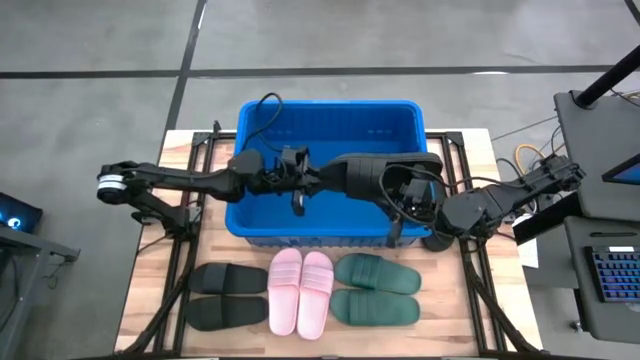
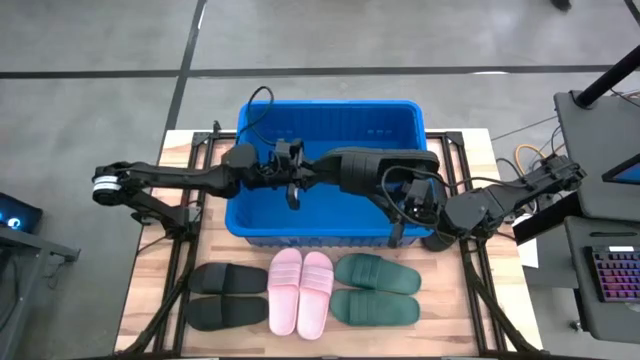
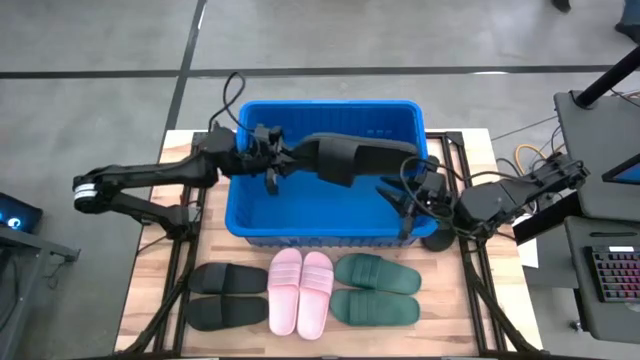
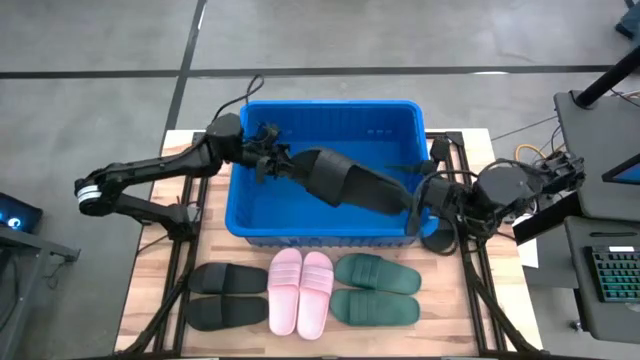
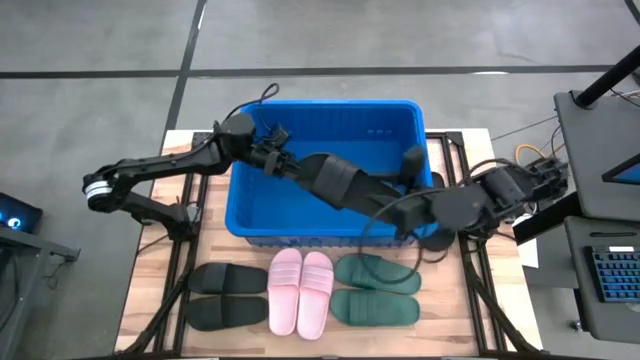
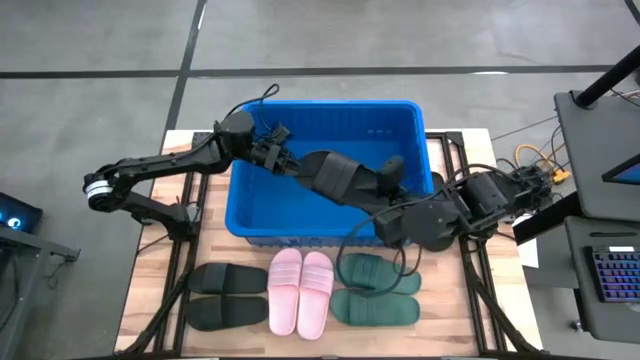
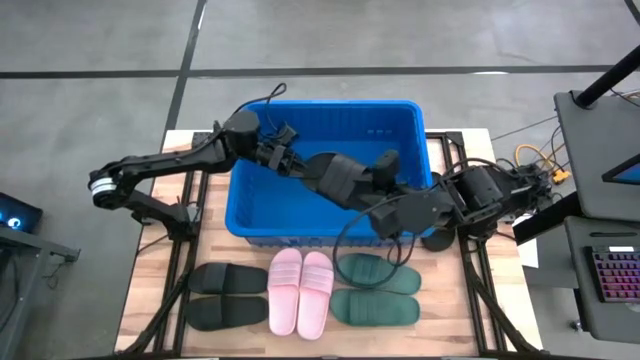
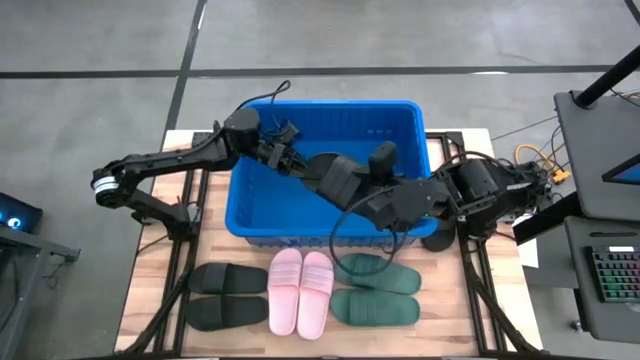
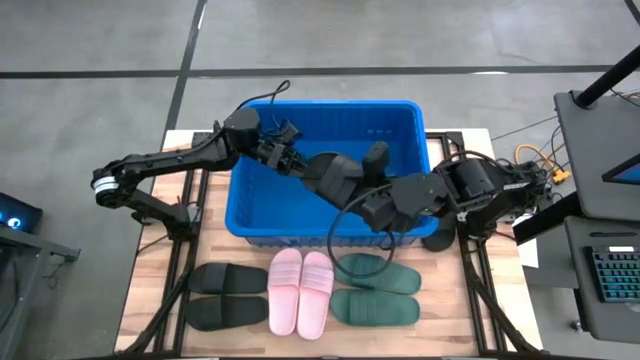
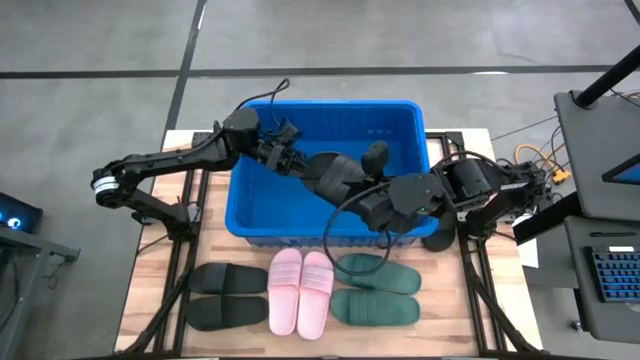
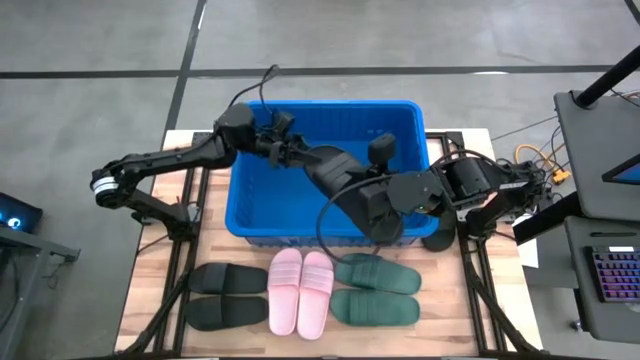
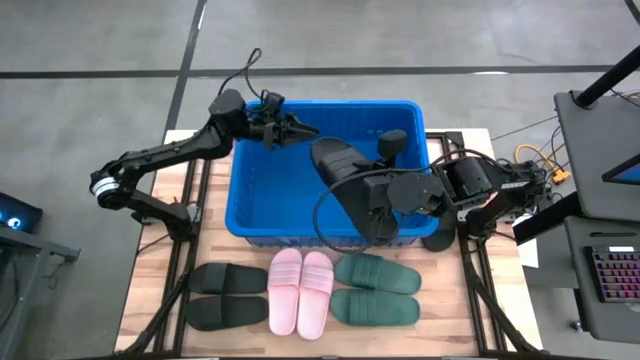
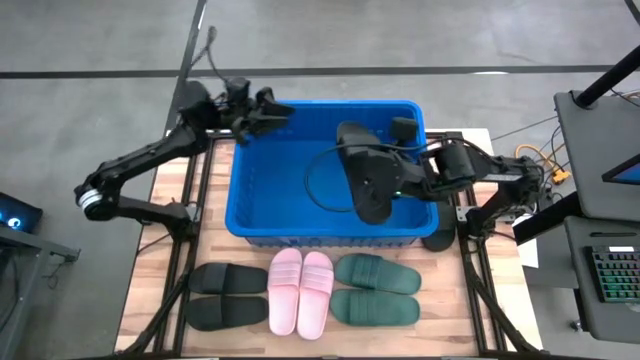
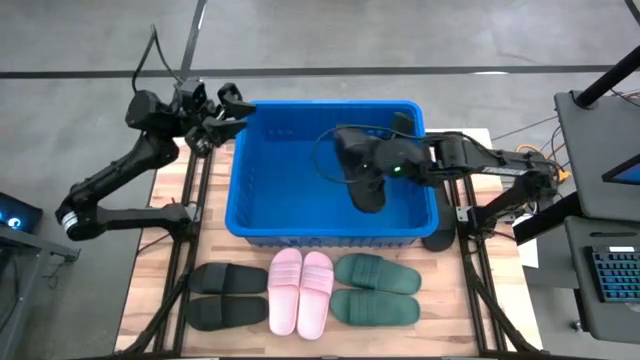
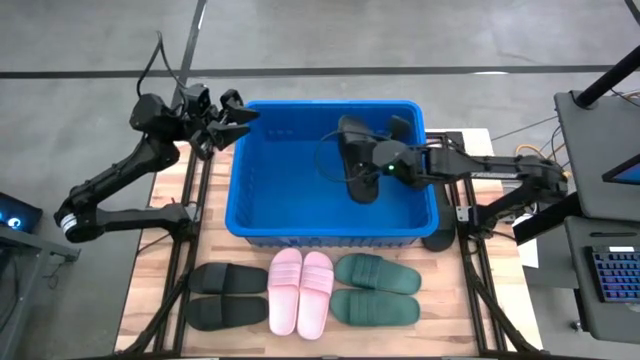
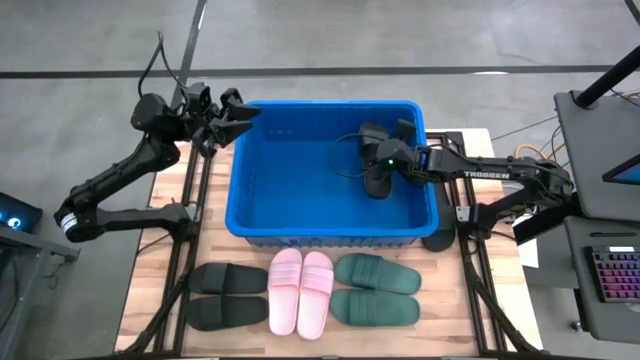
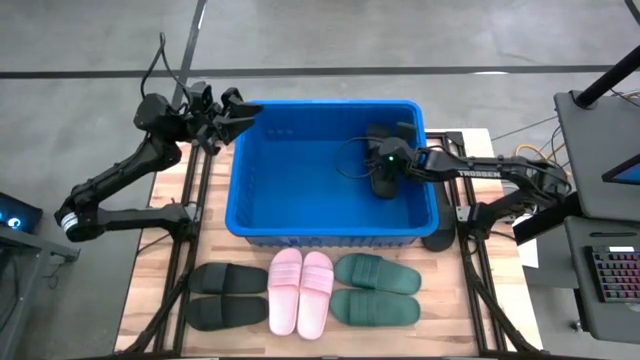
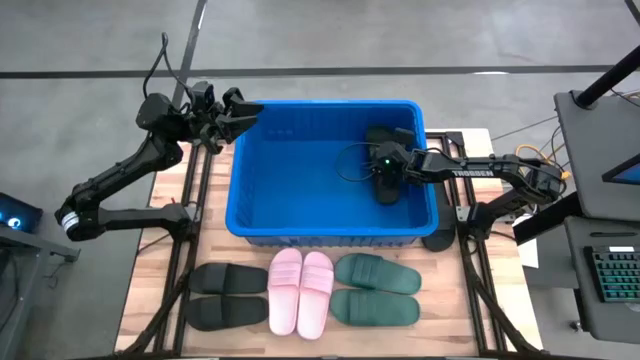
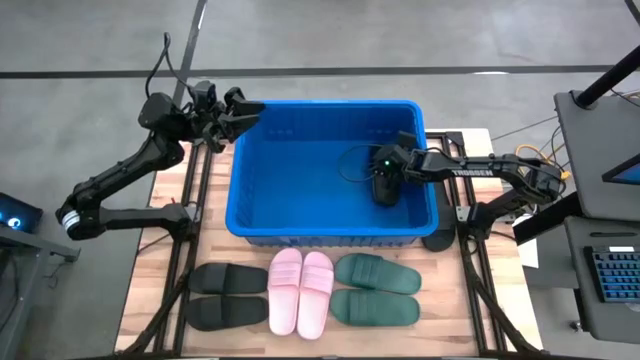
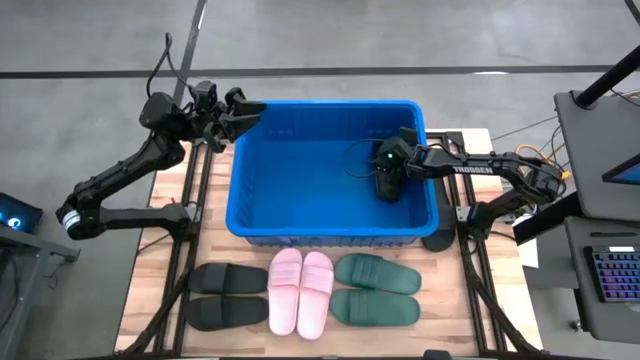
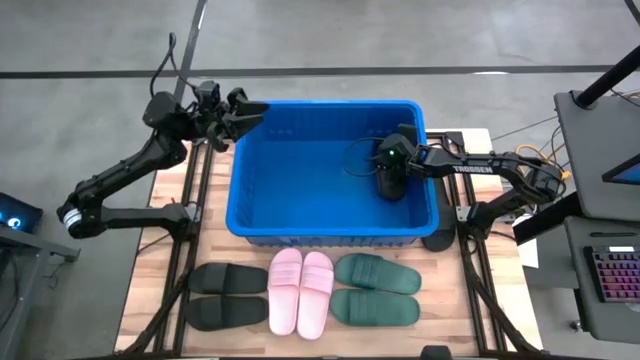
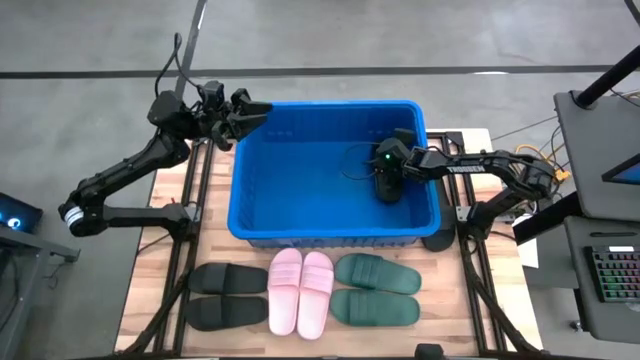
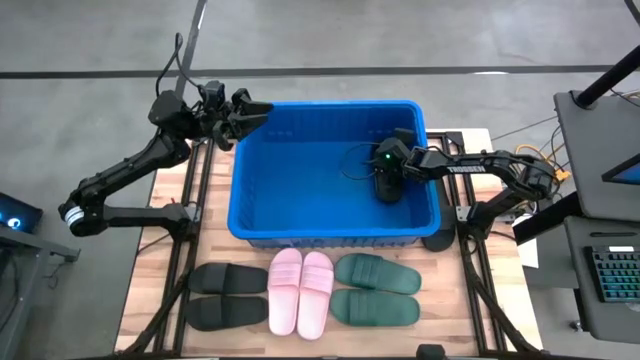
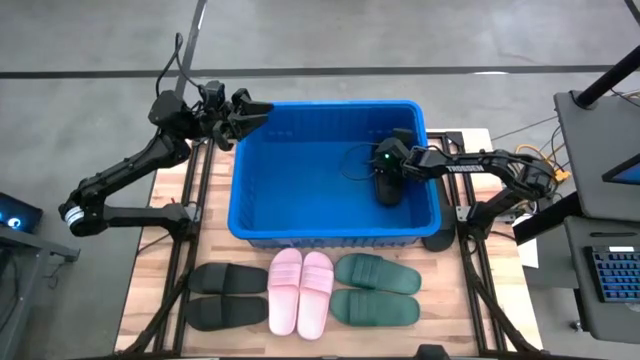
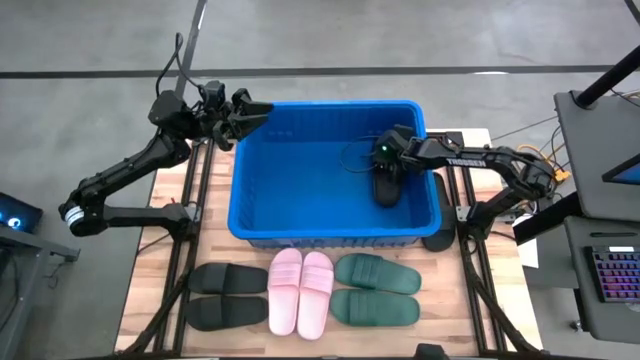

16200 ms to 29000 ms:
Task: Pick and place slides into bin
Put the black slide into the blue bin

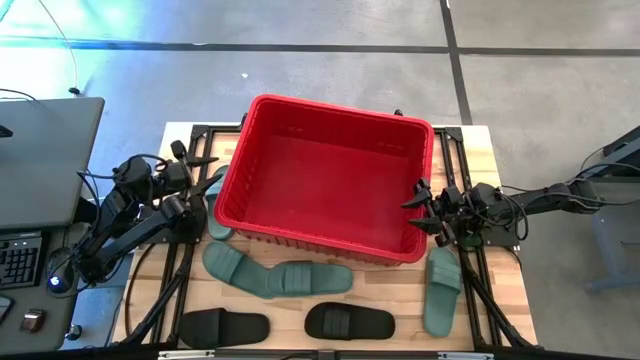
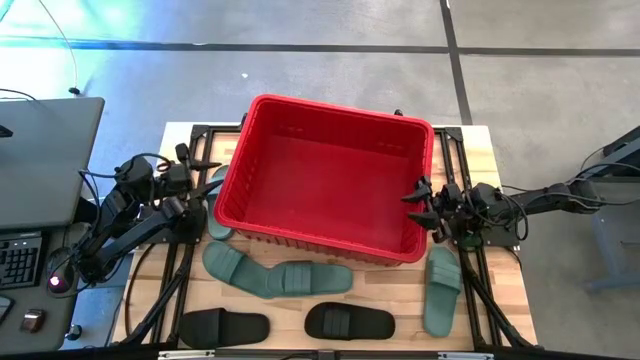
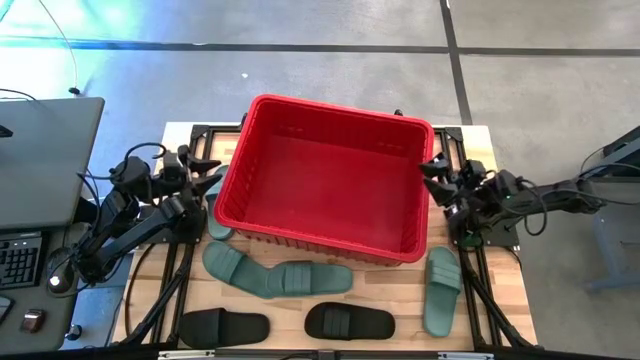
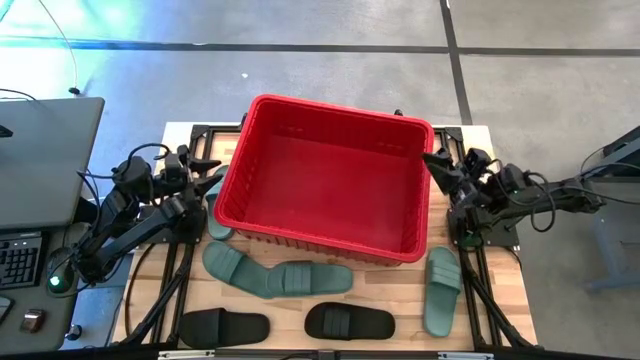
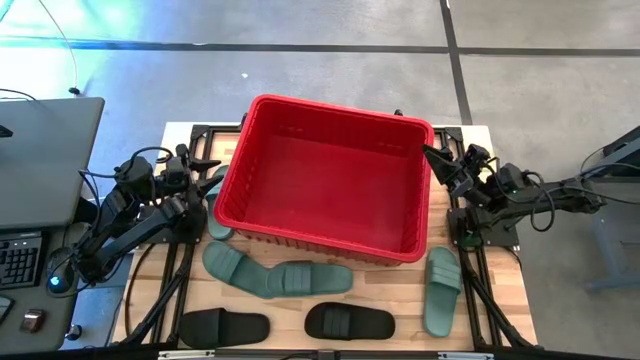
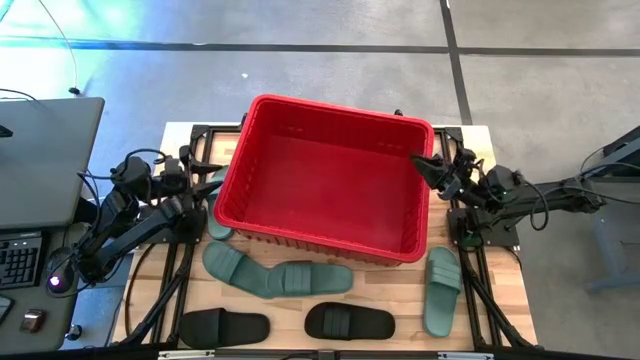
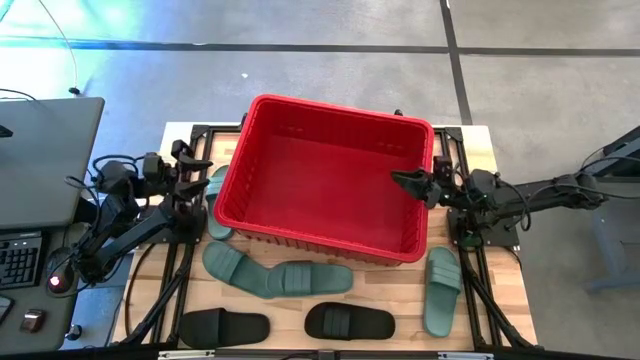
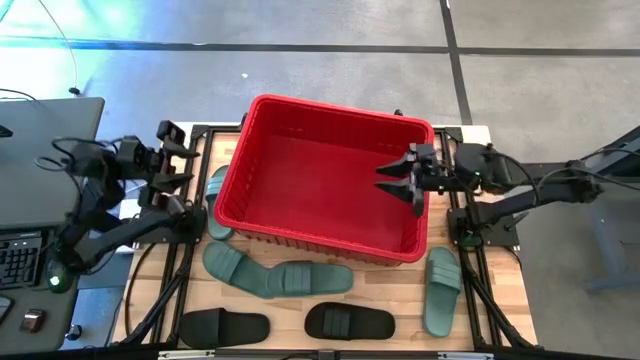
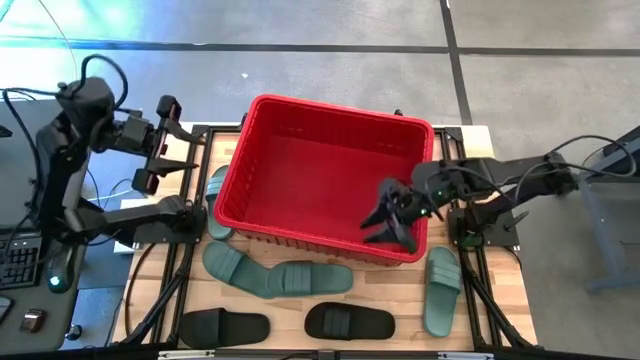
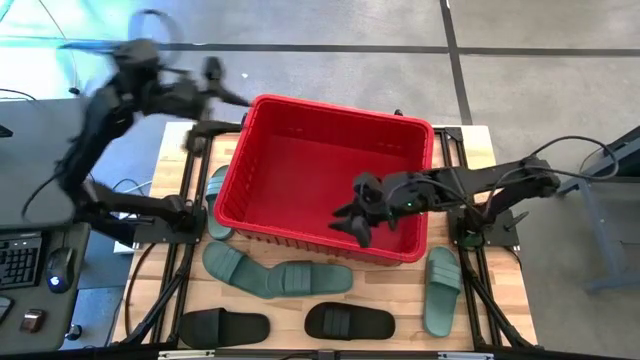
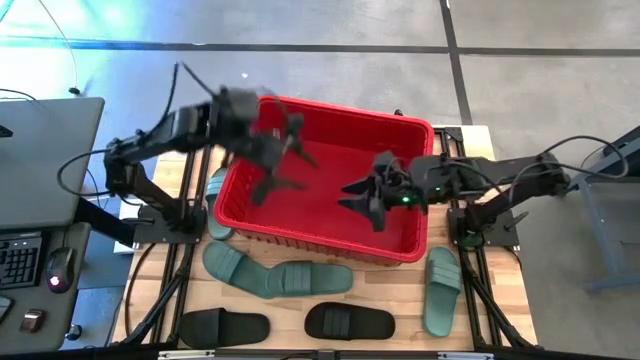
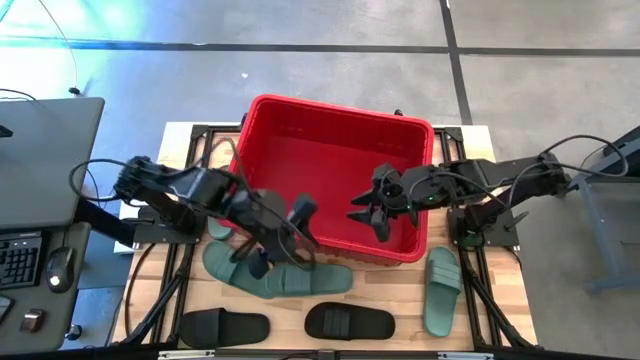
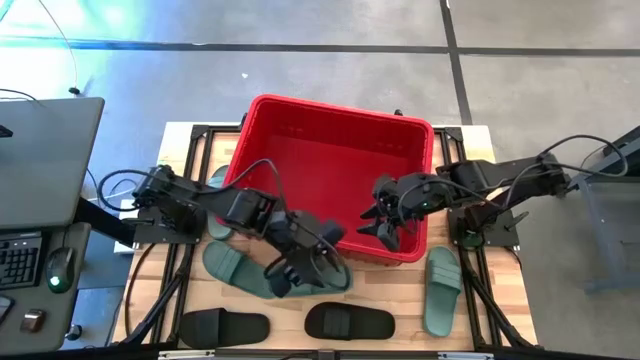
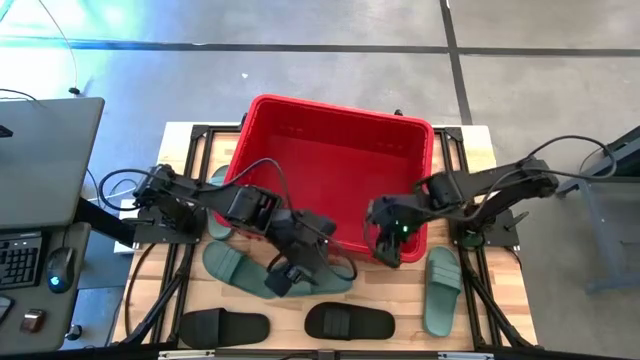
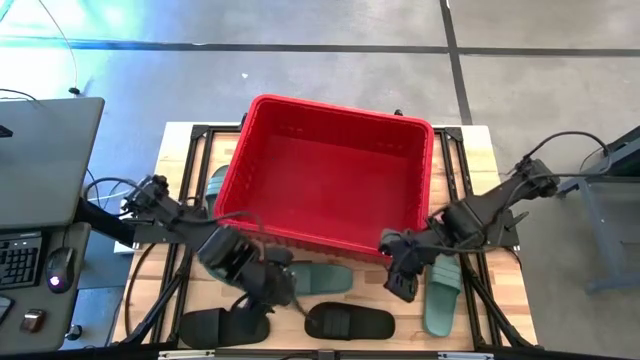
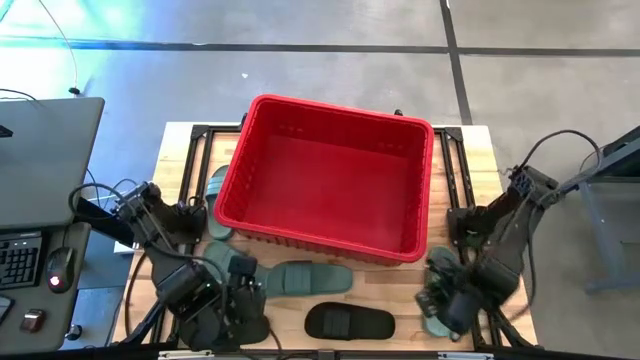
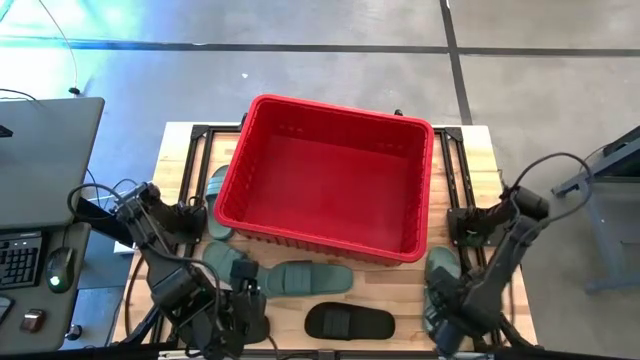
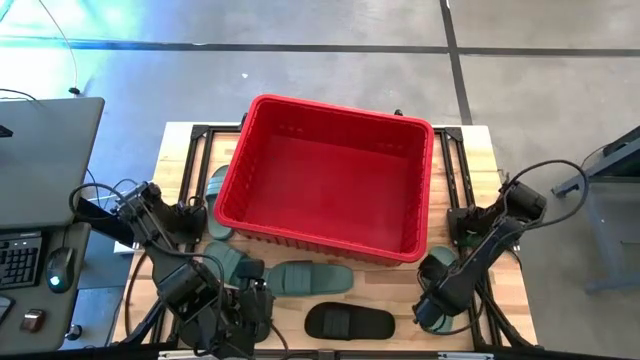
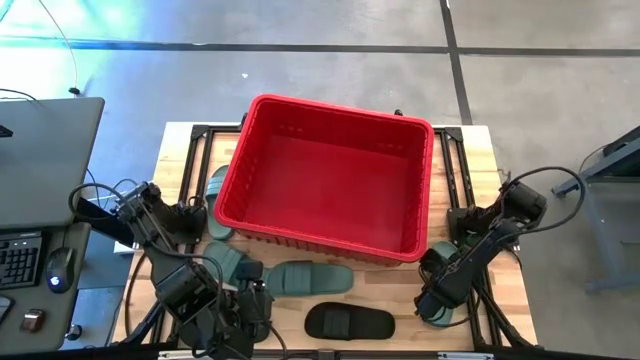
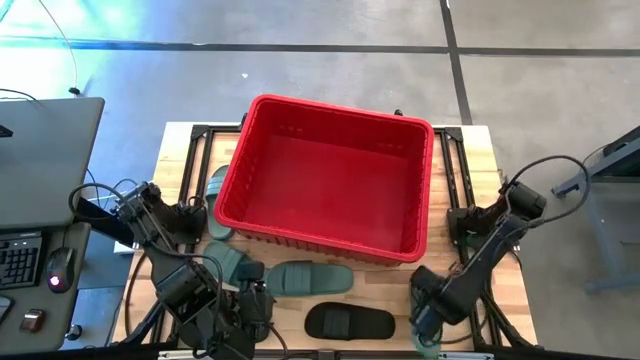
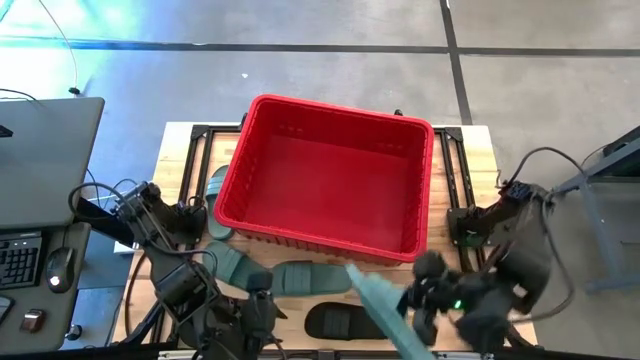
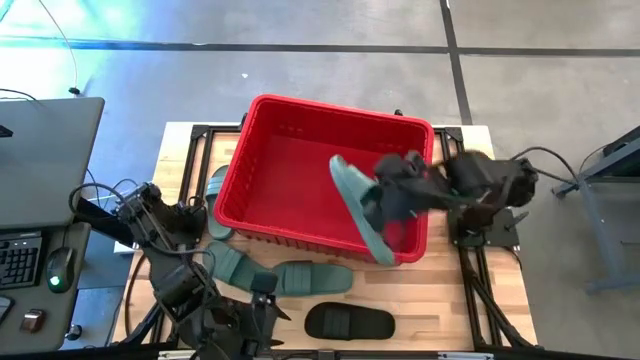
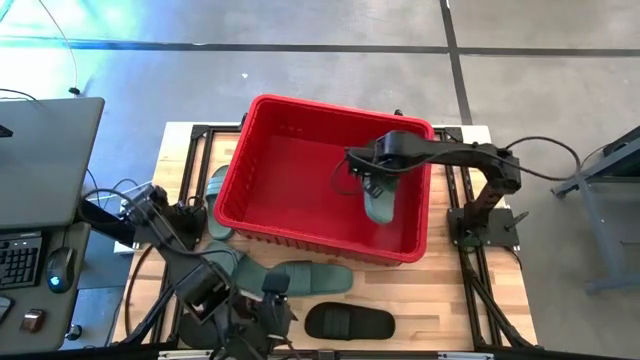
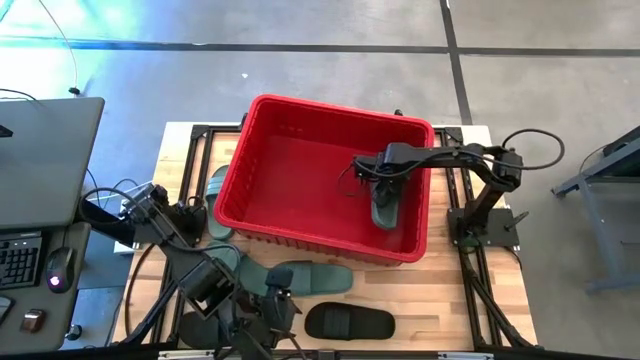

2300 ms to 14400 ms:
Task: Pick and place slides into bin
Put the green slide into the red bin
